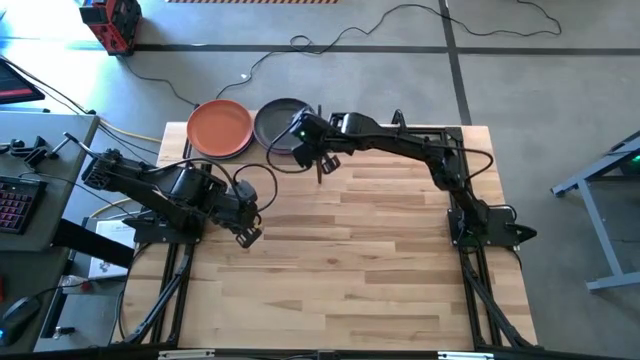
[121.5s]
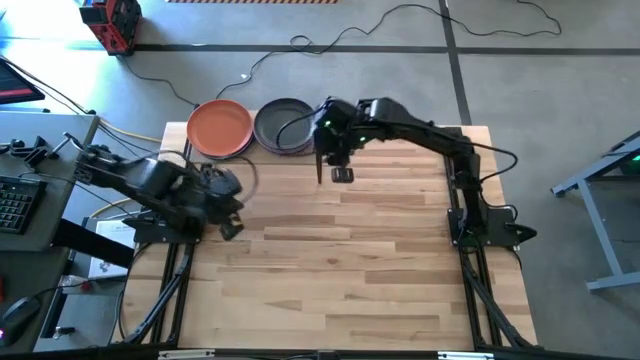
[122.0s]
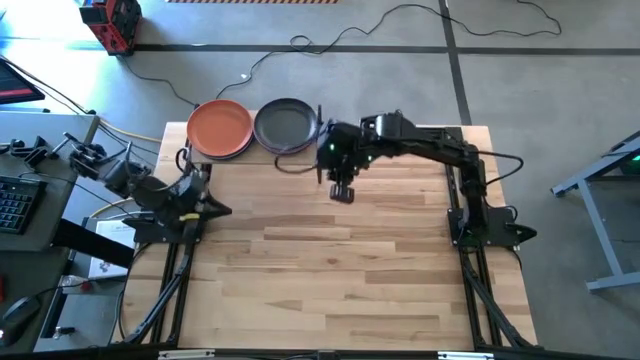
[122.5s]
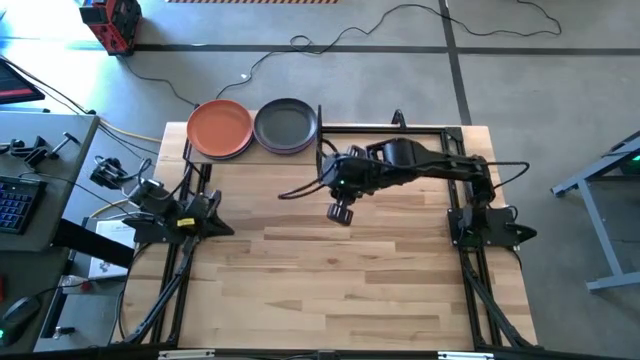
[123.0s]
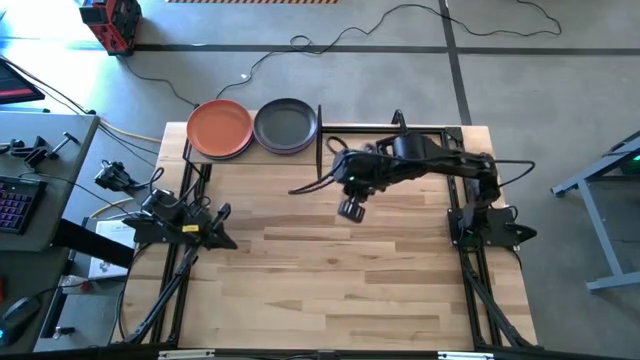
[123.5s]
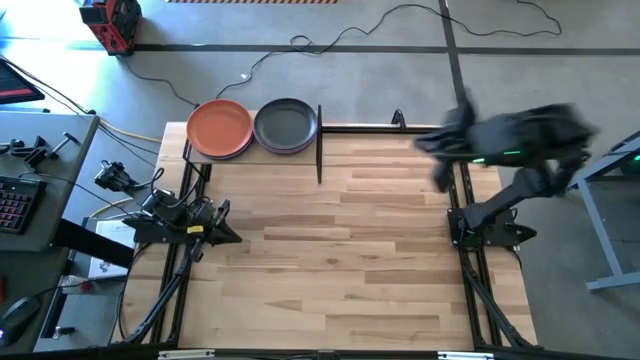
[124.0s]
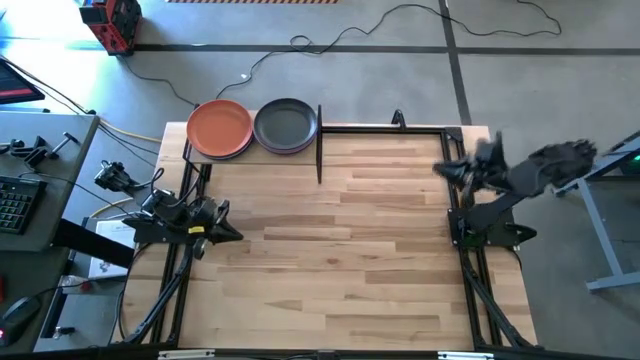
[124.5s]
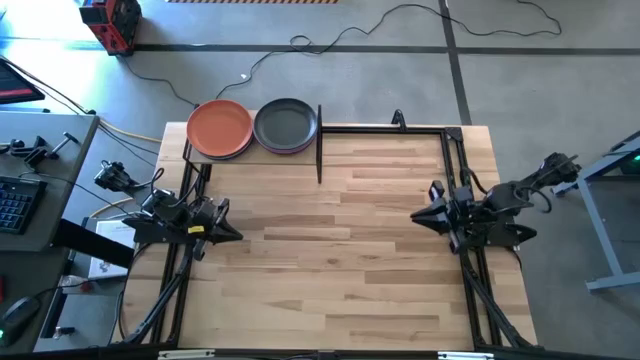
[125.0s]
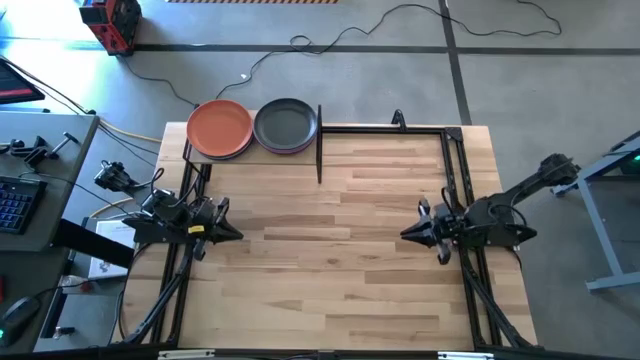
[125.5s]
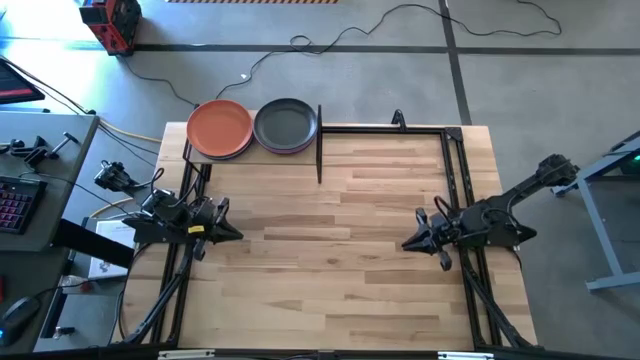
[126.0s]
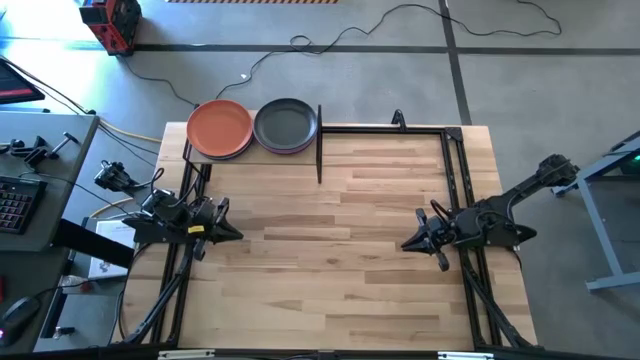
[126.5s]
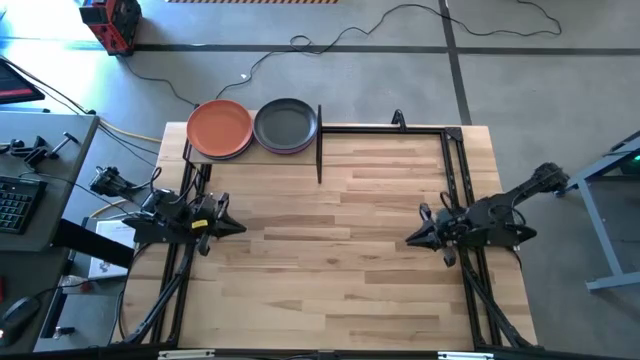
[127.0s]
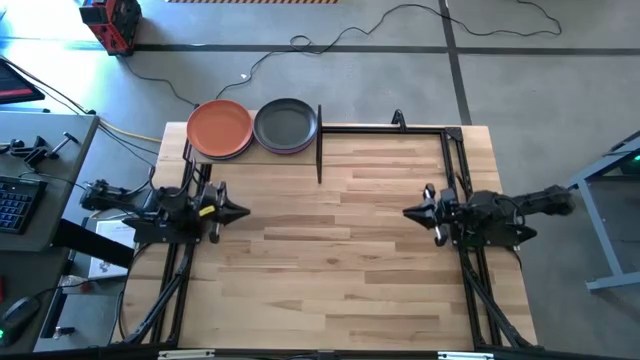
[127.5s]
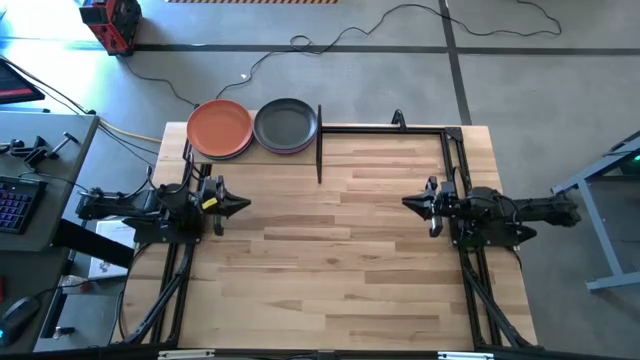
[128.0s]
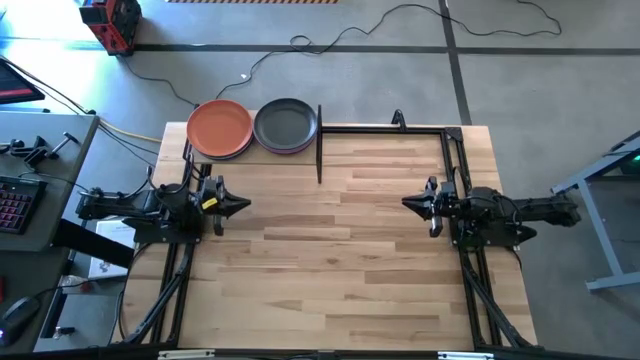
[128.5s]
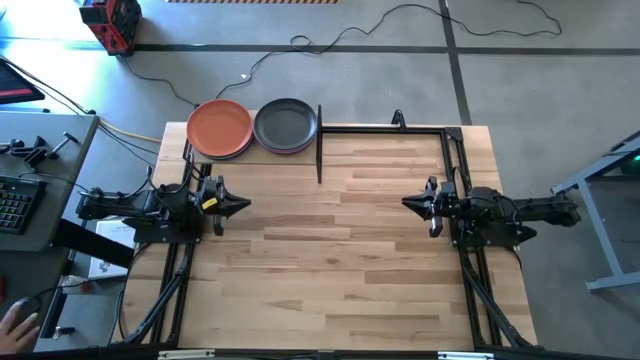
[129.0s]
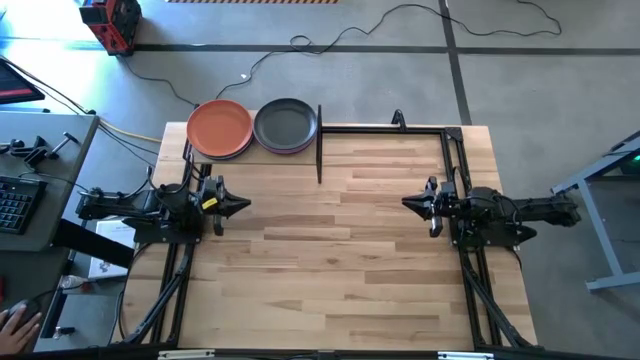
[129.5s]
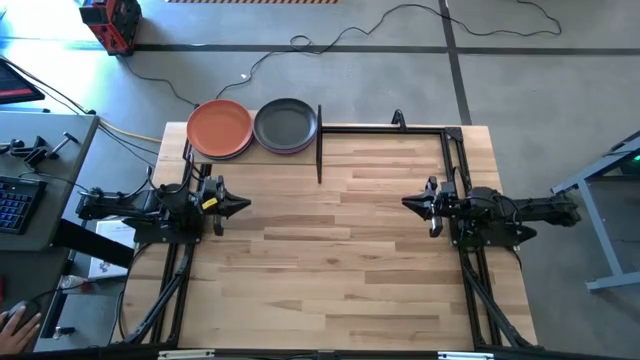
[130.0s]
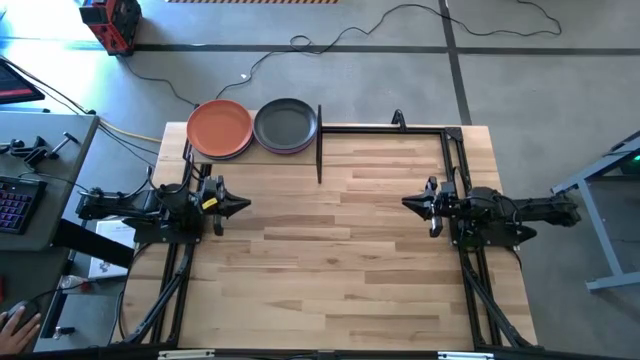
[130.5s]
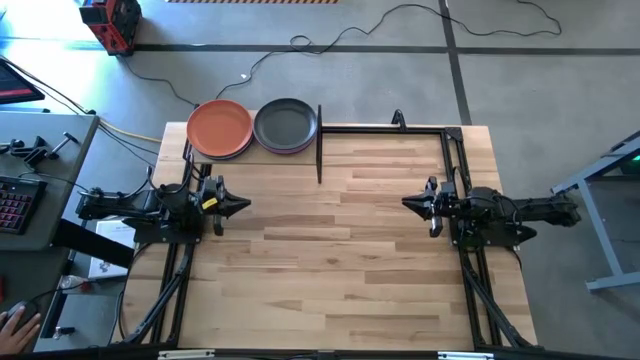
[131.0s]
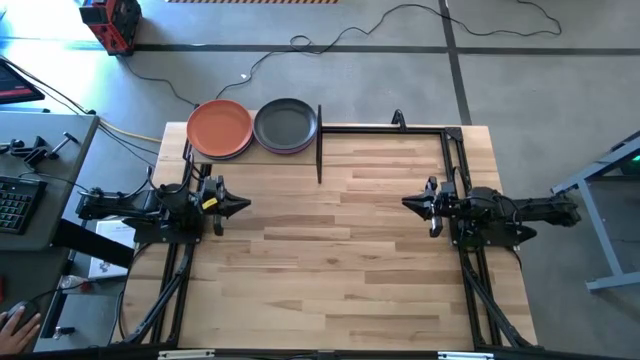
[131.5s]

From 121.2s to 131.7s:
Task: Place and stack plates onto a shelf
Return to Home Position

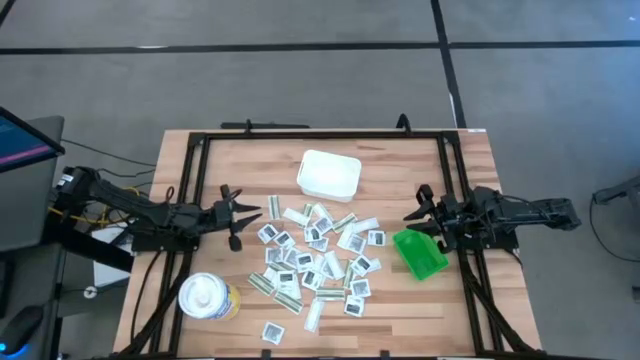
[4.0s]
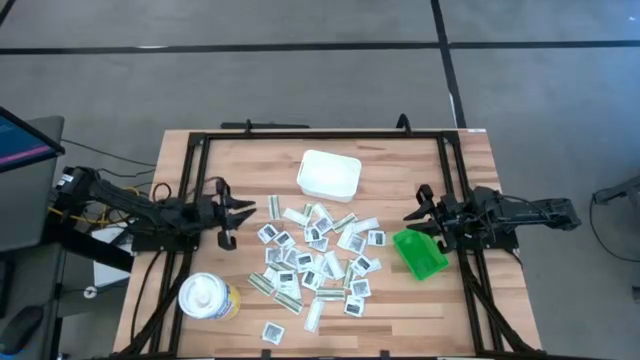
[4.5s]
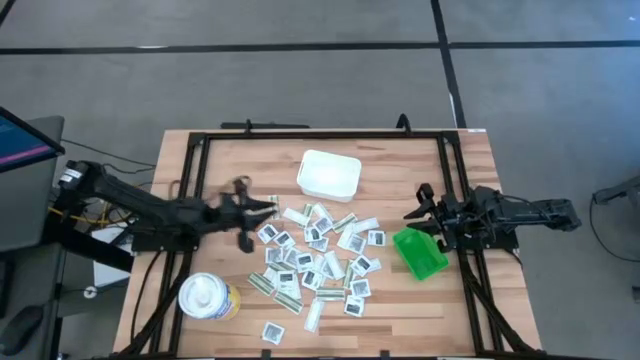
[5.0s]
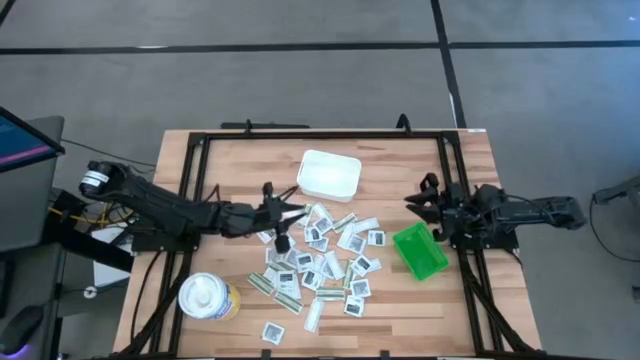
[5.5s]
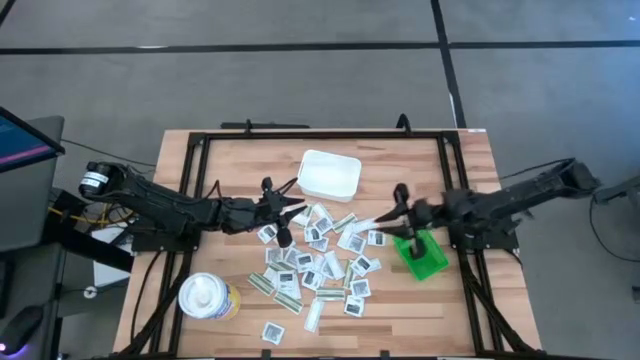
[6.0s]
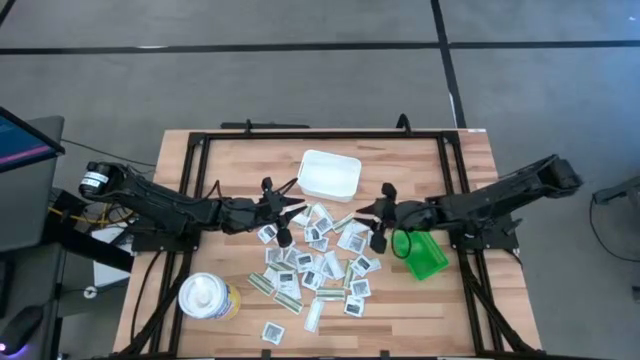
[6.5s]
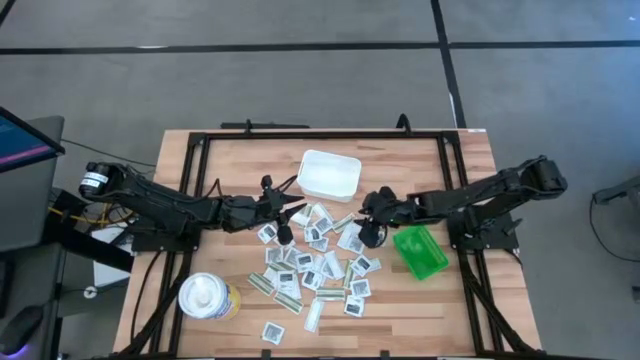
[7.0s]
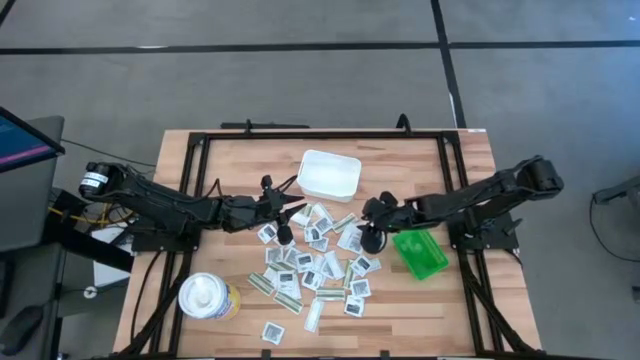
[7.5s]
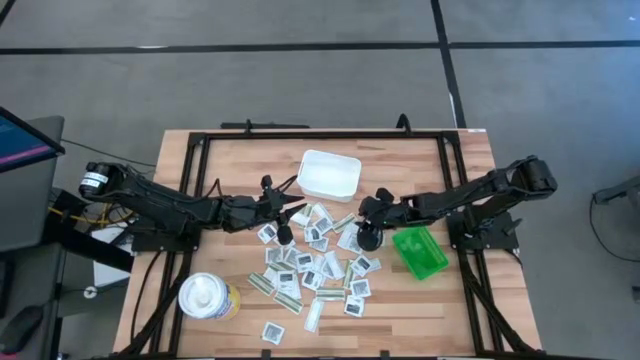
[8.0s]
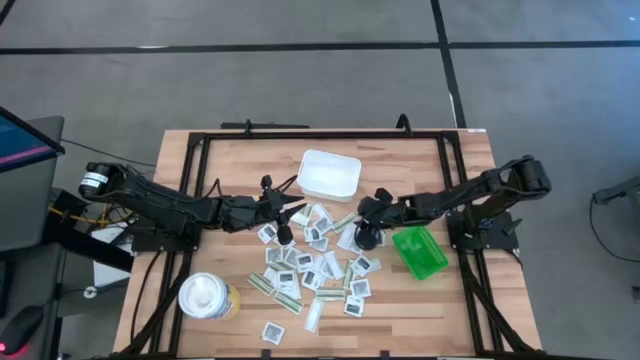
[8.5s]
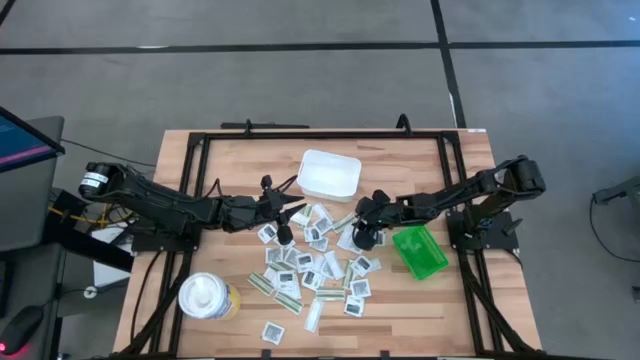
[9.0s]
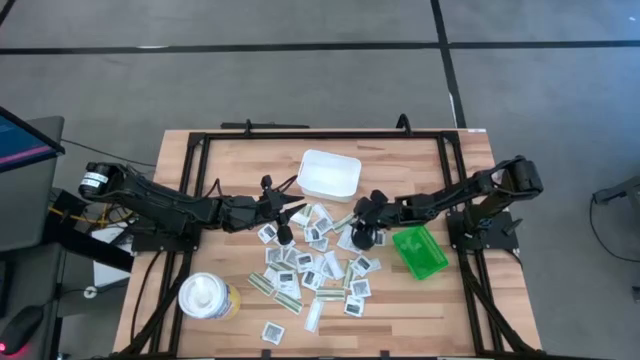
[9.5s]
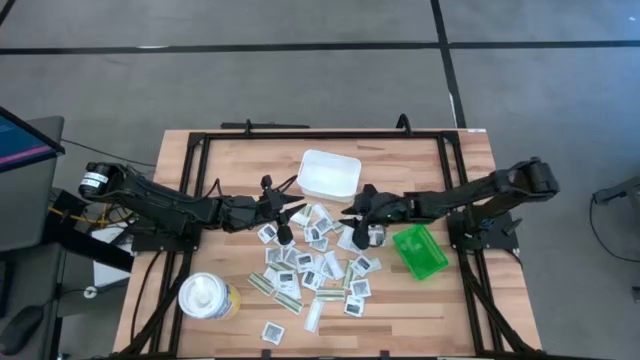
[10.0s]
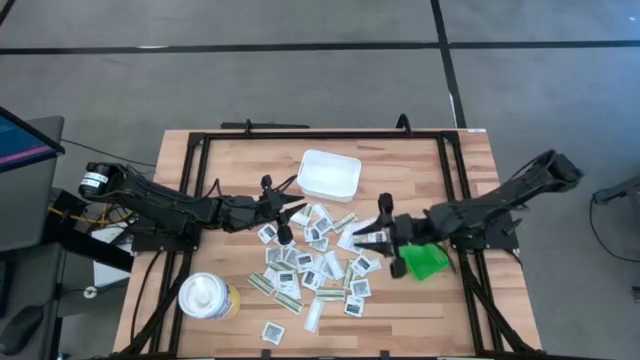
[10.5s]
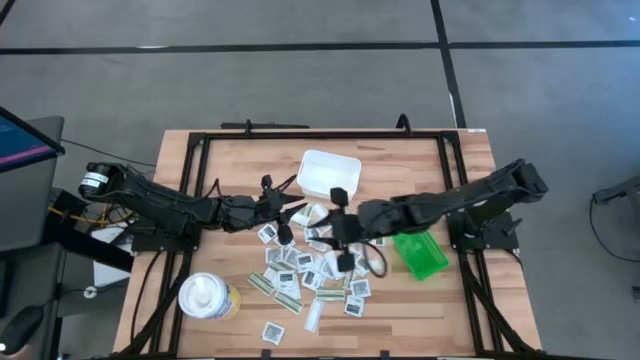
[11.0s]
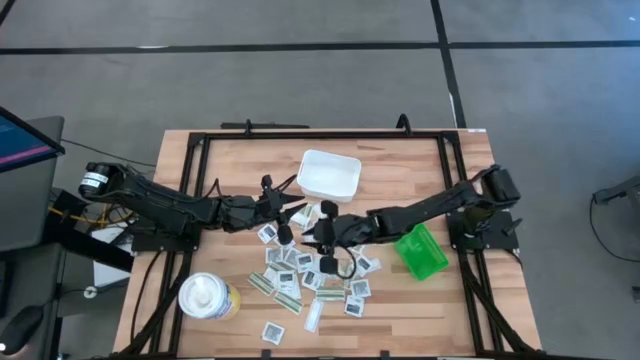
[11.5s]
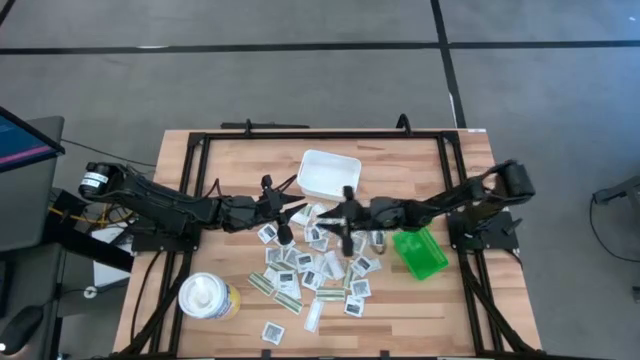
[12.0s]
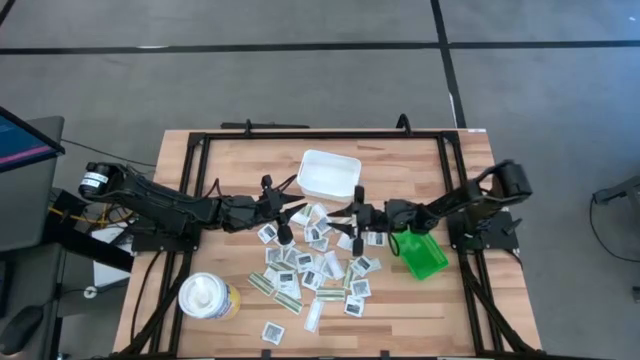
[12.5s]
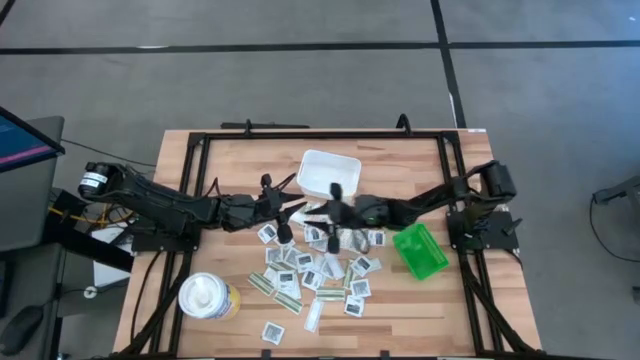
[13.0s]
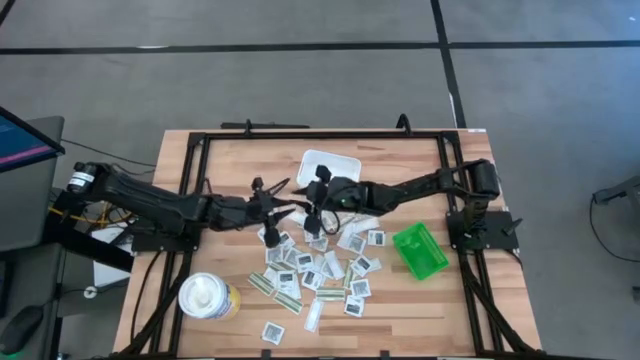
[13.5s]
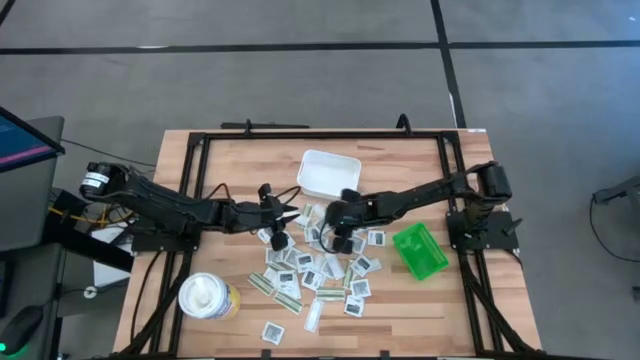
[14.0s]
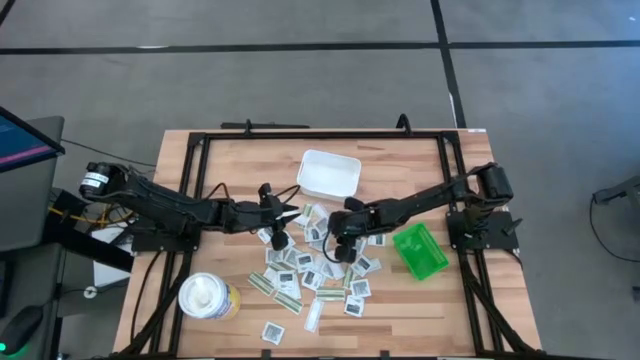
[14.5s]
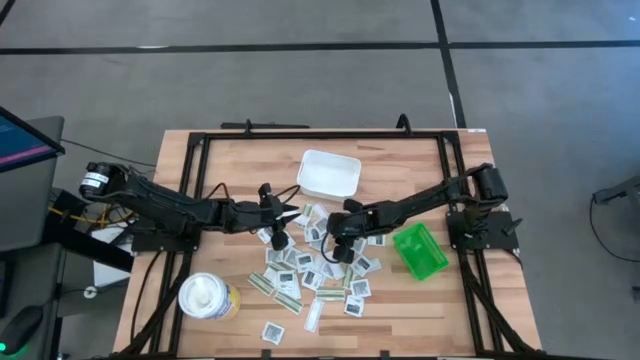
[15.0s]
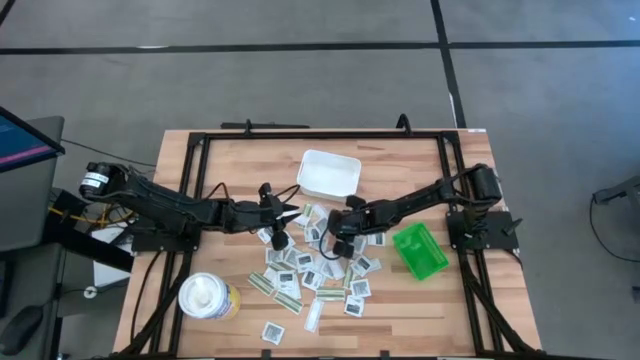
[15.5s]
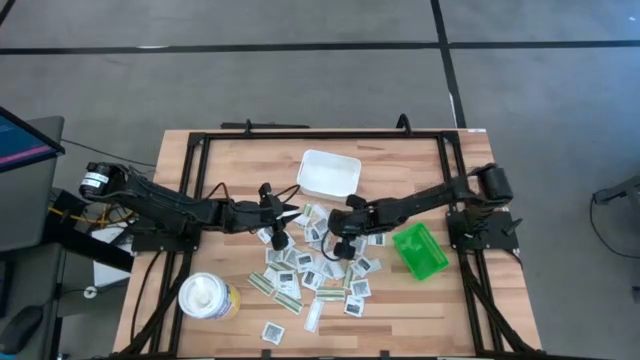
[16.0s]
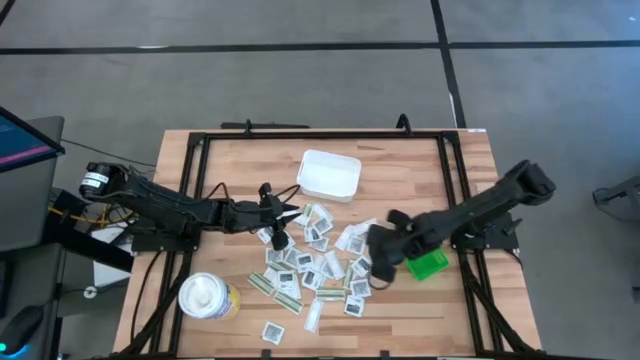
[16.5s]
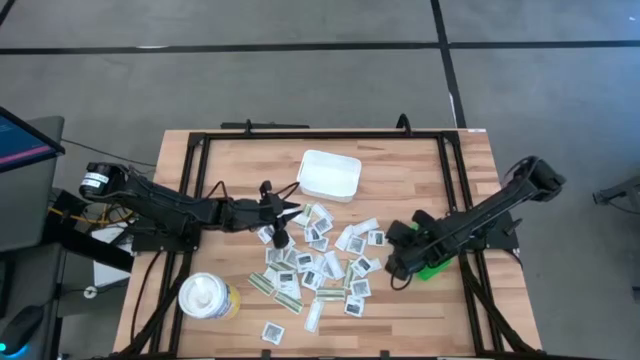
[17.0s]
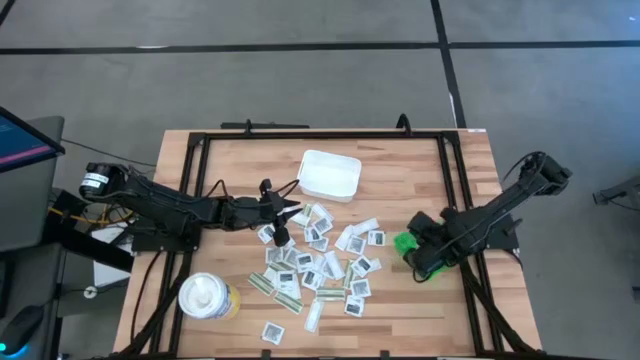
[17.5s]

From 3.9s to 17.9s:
Task: Pick & Place First Aid Supplies
Put the bandage pack into the green bin
